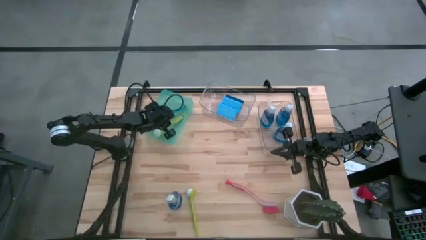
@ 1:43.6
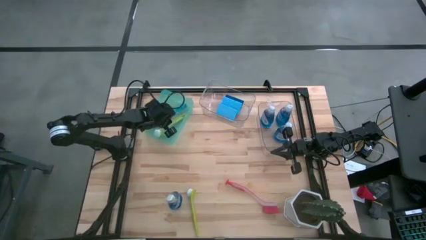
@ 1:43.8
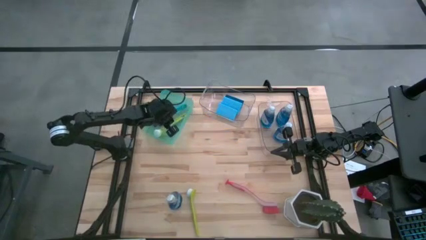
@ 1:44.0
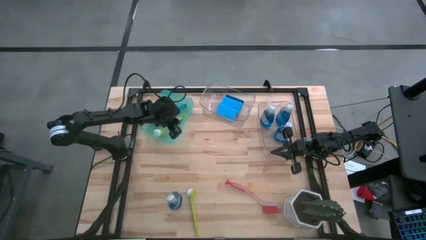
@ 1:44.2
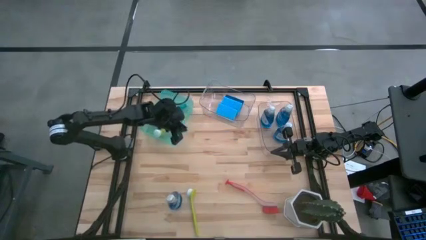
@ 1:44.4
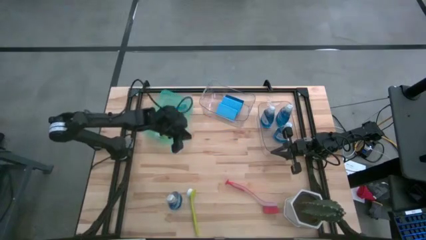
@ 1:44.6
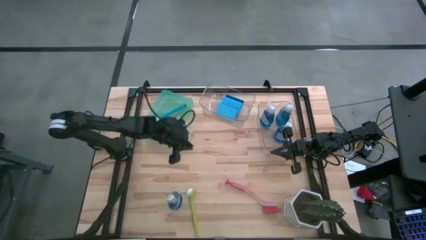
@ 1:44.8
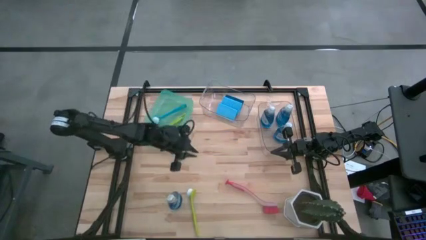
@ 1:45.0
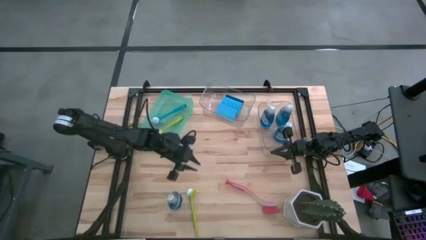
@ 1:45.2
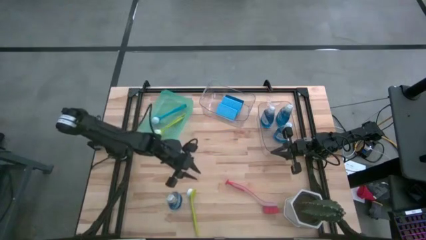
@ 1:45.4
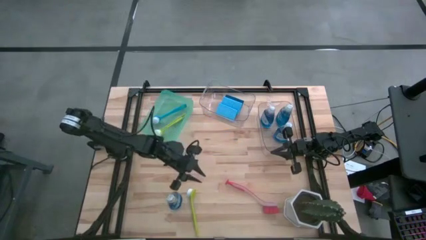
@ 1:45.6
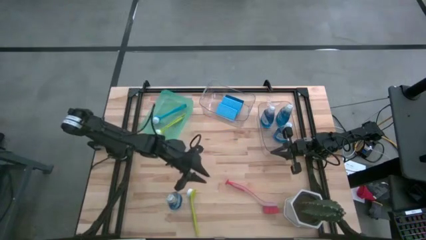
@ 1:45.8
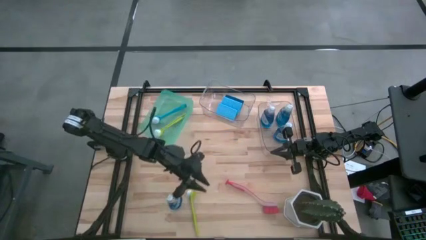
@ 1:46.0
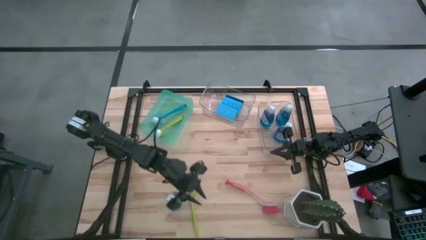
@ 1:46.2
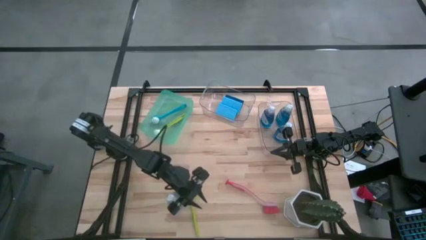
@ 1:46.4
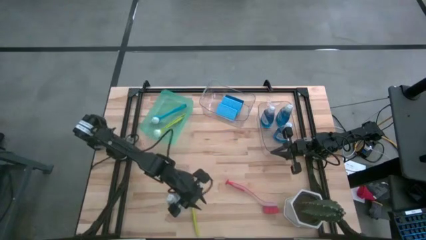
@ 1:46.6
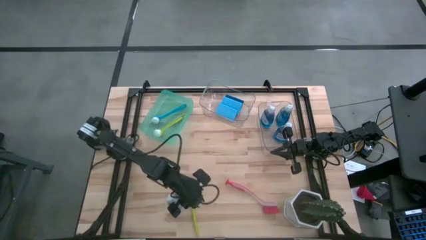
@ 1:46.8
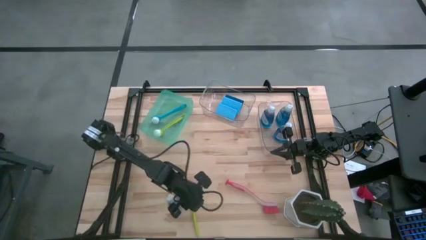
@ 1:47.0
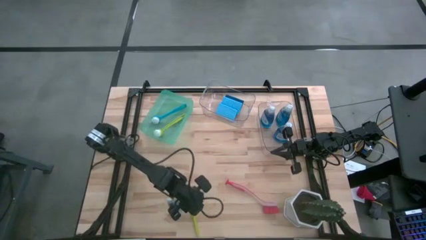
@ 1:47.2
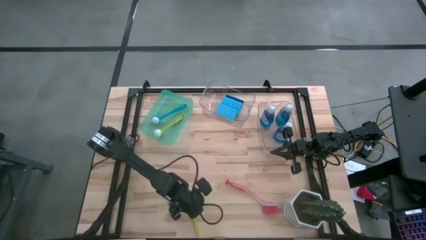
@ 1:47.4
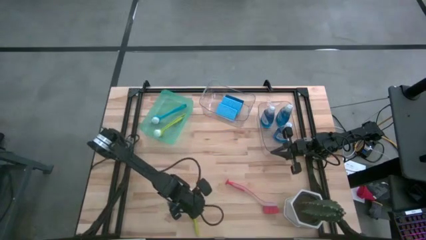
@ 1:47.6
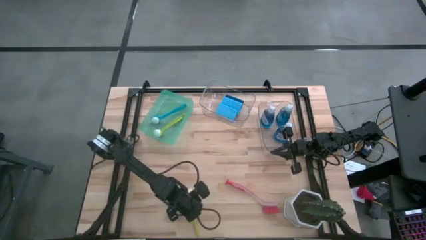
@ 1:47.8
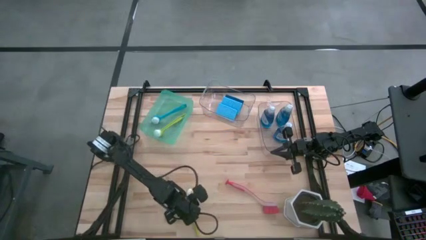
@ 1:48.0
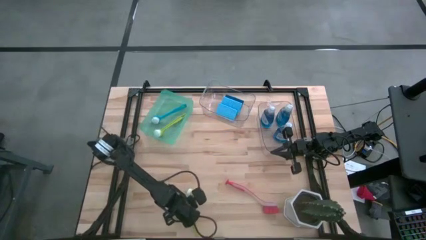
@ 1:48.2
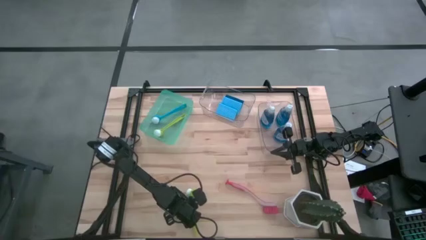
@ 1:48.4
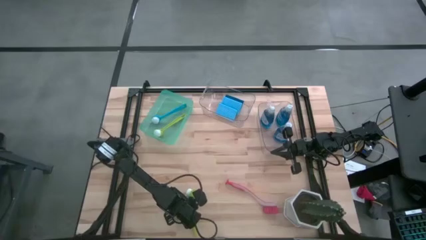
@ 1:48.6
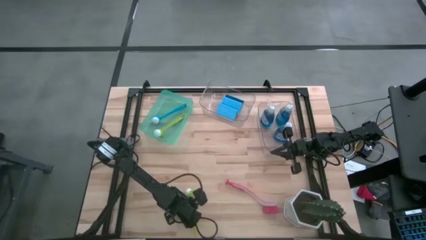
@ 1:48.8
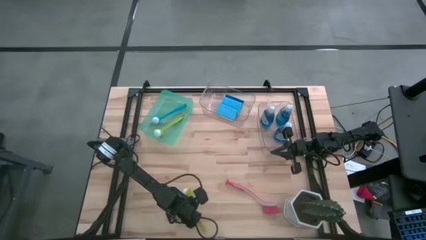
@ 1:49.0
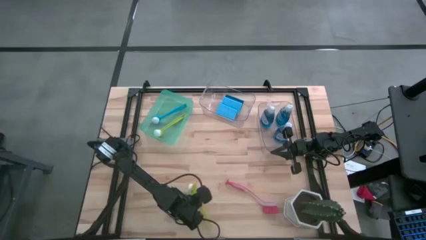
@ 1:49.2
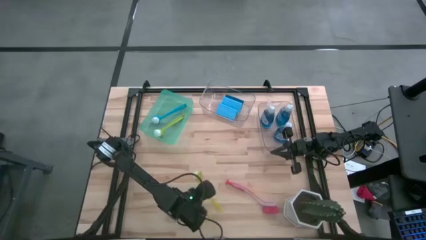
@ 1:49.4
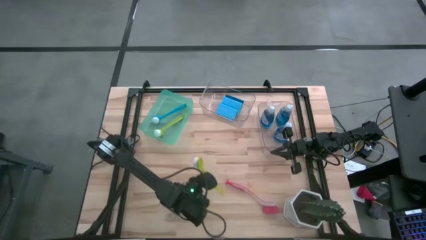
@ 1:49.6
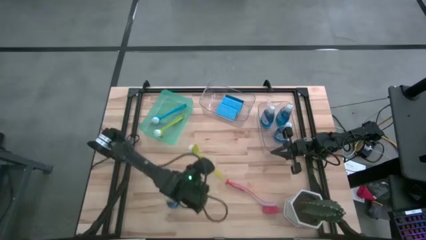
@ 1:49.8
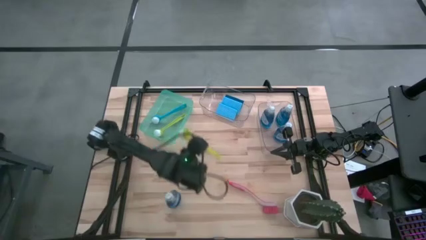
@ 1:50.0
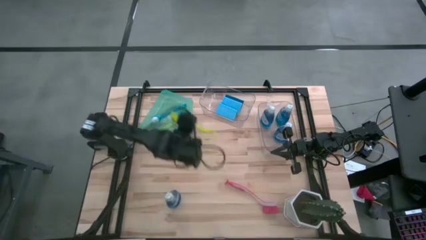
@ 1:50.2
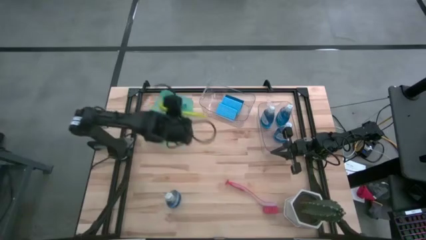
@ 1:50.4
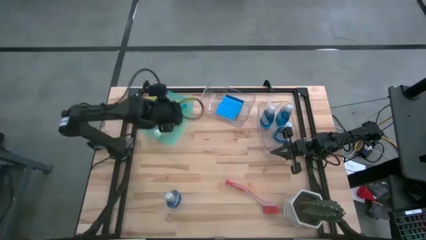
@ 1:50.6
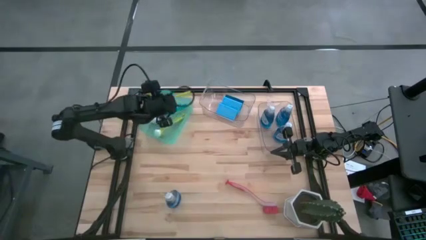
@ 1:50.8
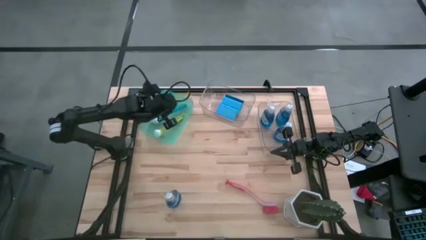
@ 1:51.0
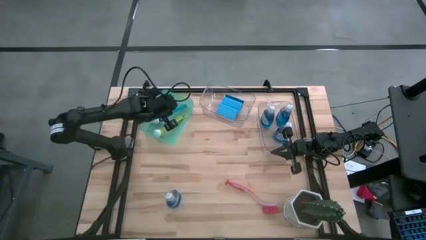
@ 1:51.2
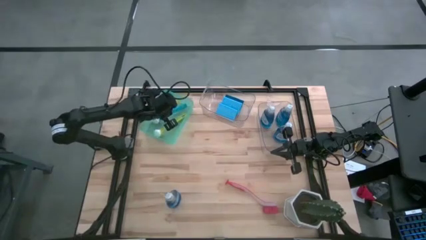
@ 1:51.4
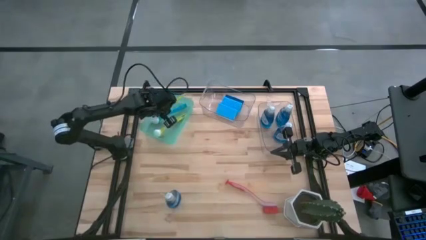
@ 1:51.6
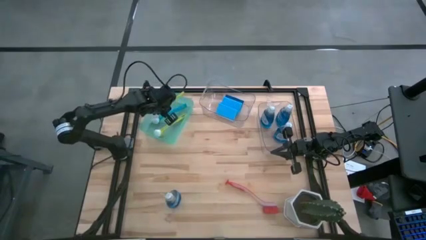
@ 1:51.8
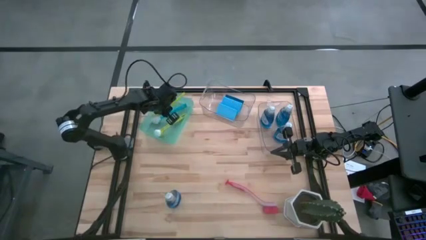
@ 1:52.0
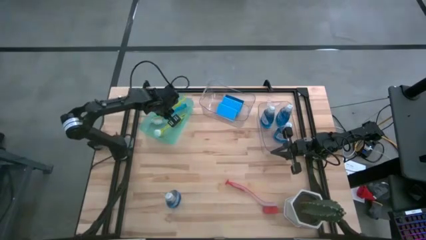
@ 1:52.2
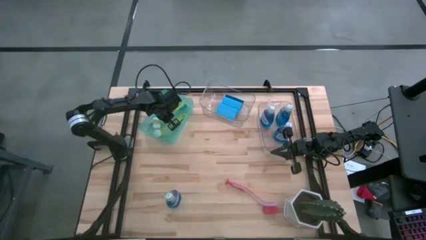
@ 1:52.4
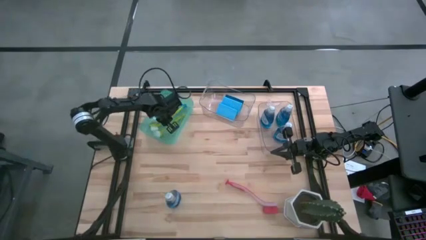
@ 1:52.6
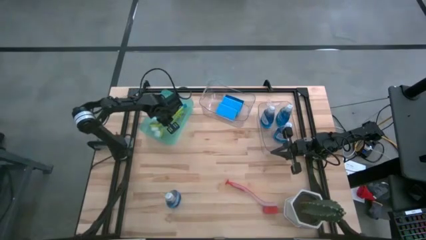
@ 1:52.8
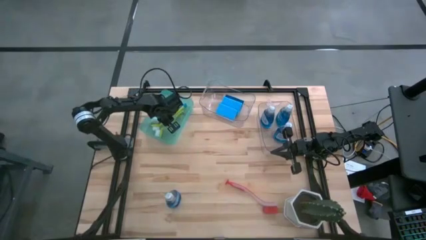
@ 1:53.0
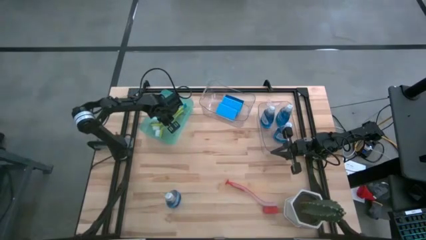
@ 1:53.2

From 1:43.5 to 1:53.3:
Task: Pick & Place Kitchen Sink Supplies
Put the green dishwashing brush into the light blue bin

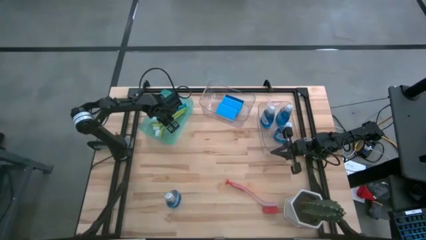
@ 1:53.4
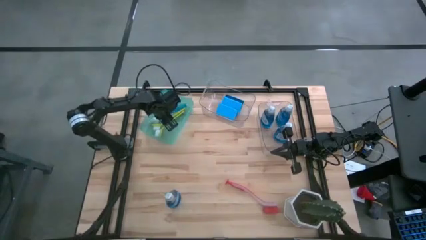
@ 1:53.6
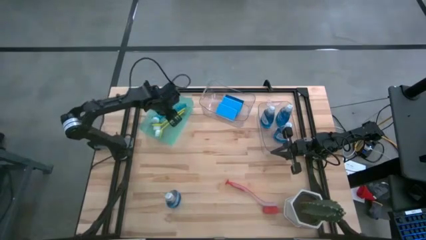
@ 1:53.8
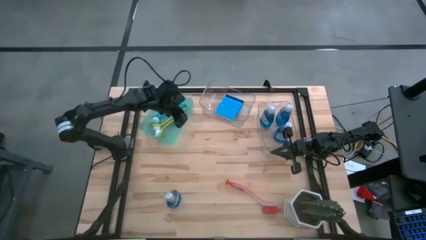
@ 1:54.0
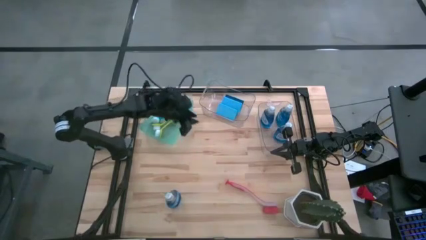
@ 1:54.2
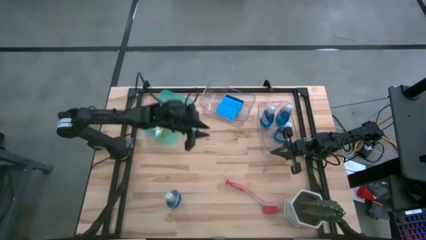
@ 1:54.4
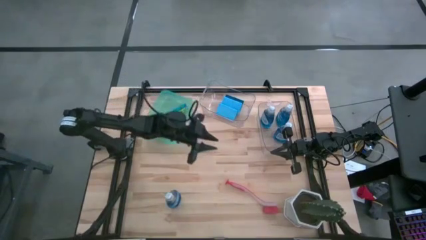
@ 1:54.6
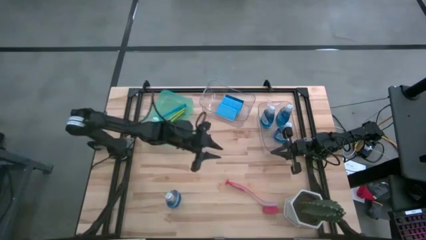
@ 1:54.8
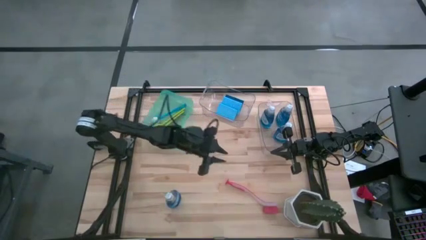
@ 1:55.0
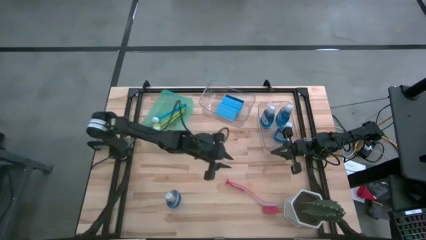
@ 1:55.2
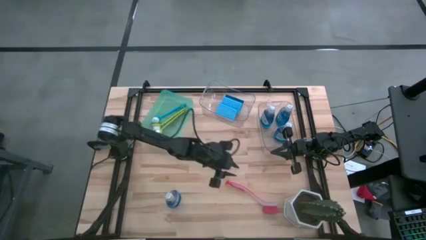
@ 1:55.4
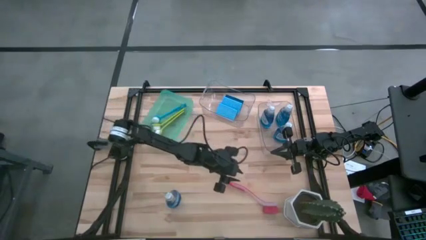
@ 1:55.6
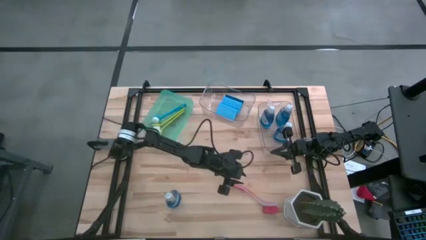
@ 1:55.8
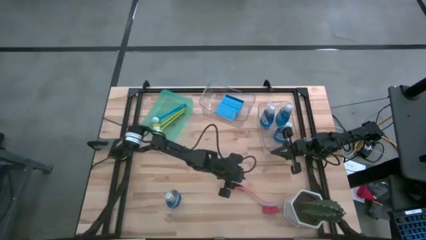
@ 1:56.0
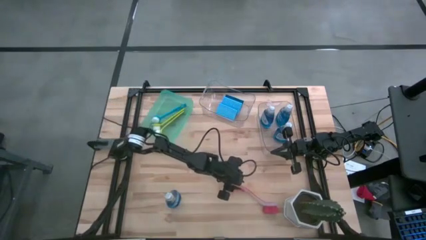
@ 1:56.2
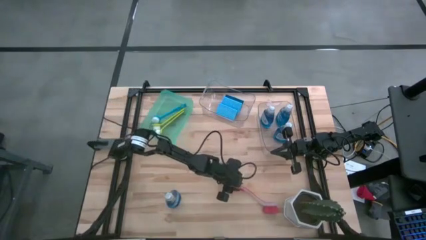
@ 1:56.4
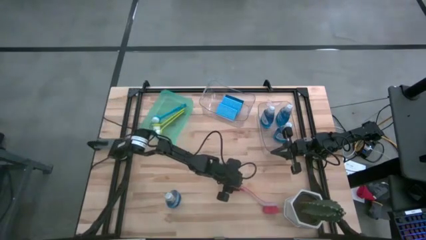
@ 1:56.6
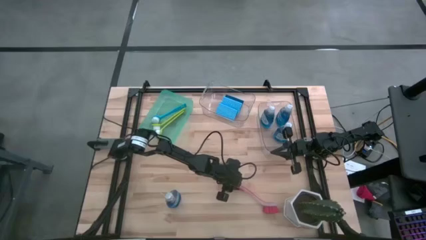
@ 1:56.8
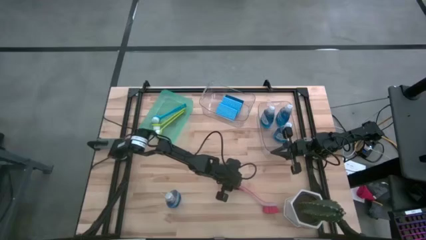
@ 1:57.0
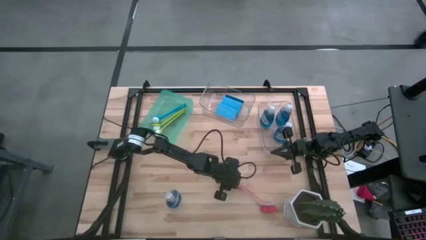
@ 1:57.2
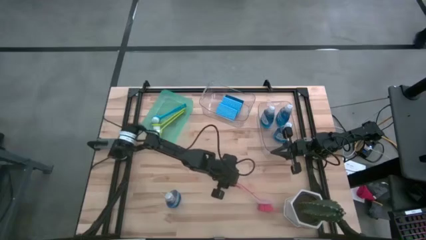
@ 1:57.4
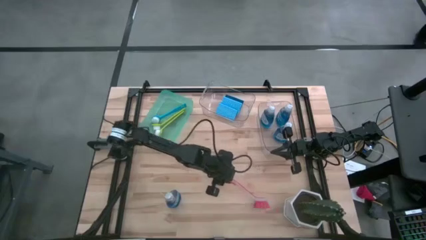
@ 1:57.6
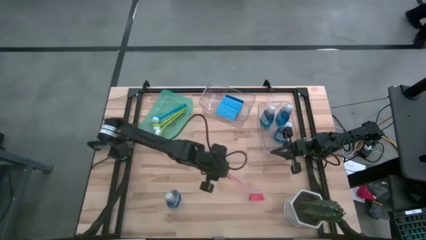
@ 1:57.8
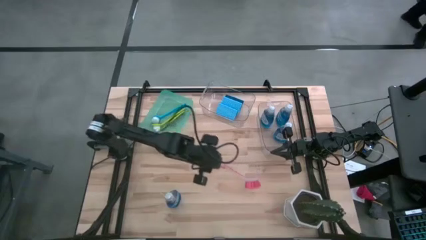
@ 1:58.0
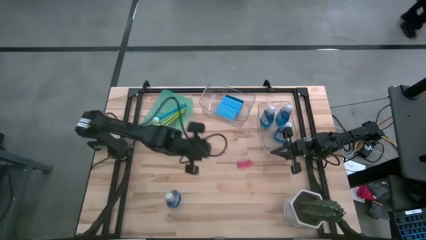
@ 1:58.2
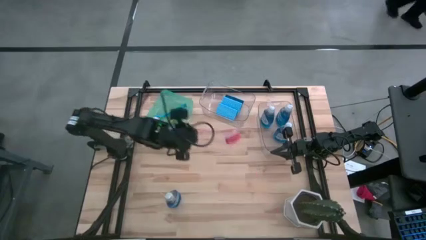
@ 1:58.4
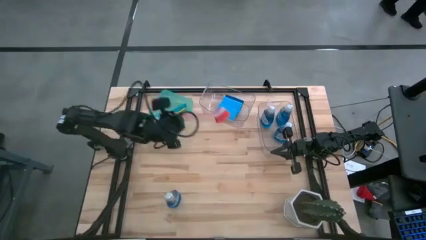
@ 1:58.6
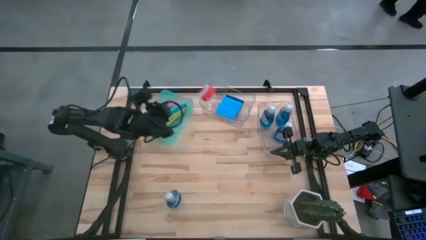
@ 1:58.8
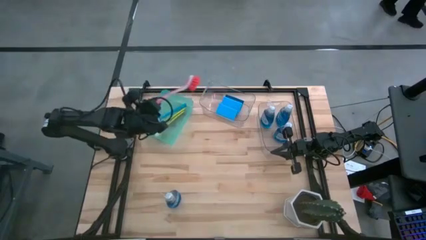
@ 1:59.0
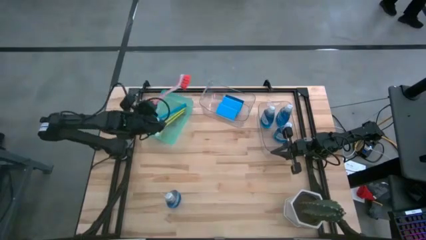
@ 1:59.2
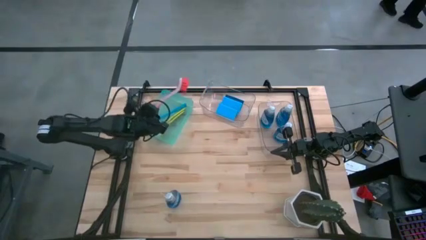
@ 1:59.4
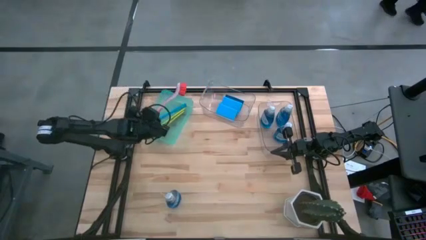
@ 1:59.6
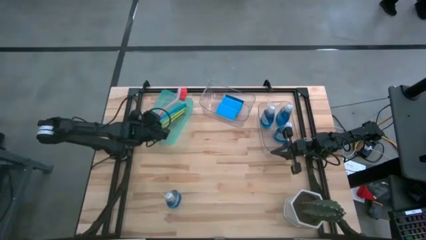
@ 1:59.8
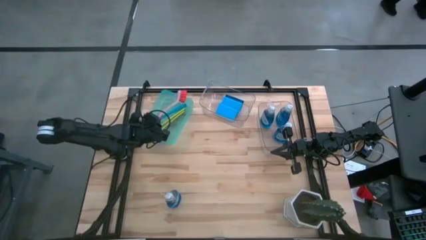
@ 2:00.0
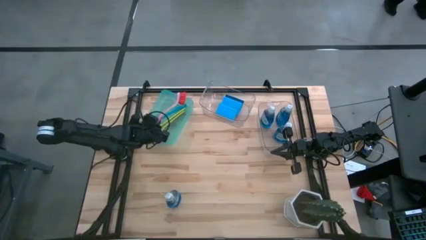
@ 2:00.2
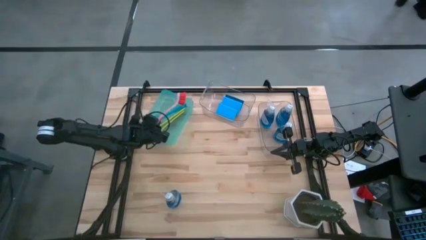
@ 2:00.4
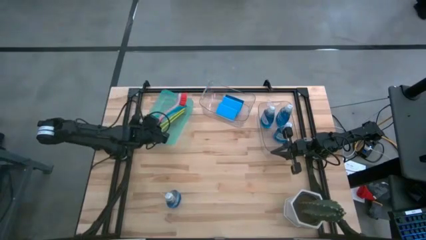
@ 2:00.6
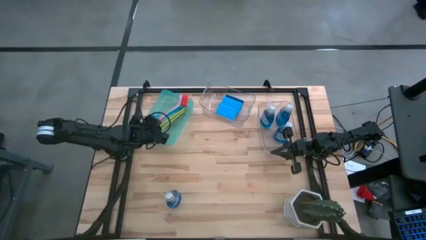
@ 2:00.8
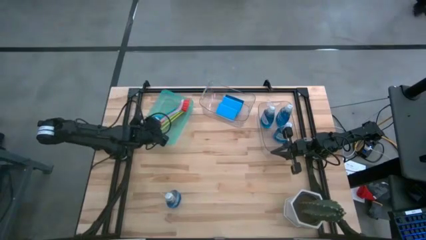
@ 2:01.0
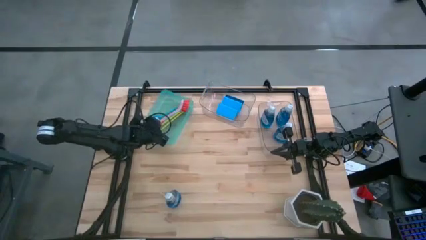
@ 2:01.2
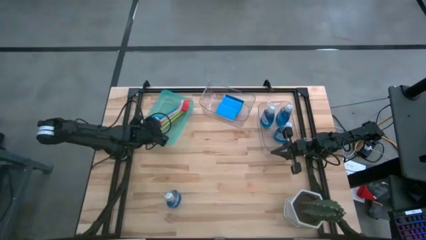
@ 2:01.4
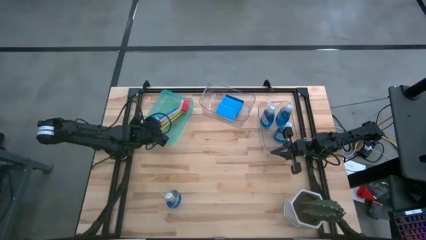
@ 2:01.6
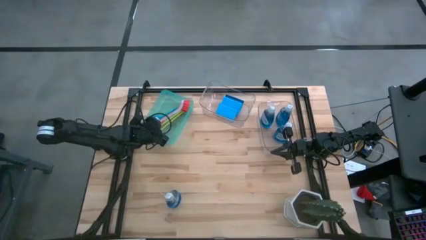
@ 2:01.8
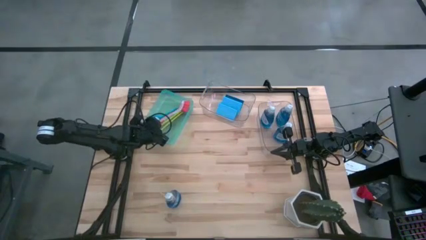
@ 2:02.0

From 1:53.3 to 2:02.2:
Put the red dishwashing brush into the green bin
